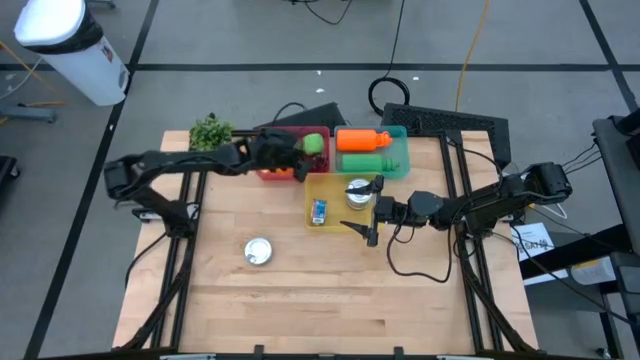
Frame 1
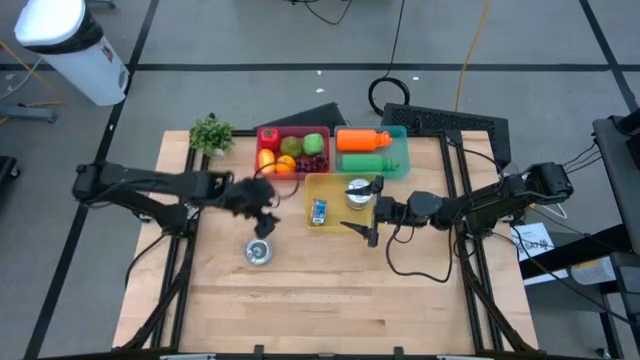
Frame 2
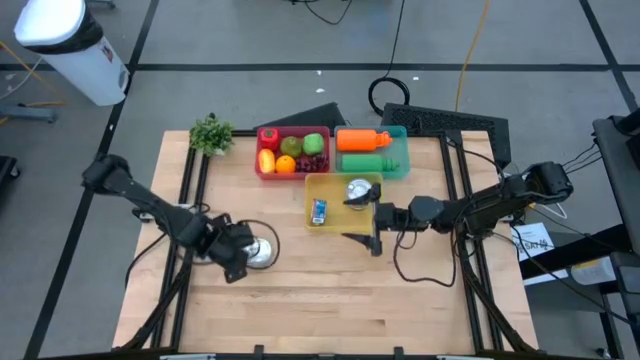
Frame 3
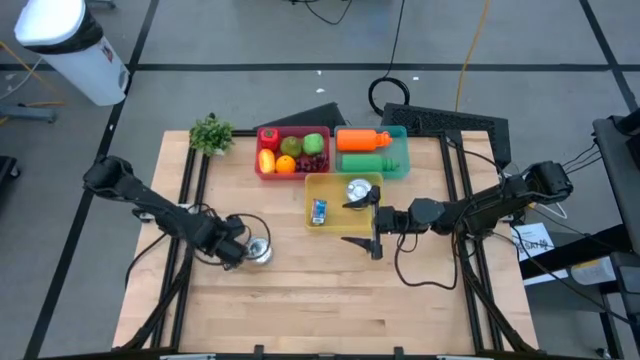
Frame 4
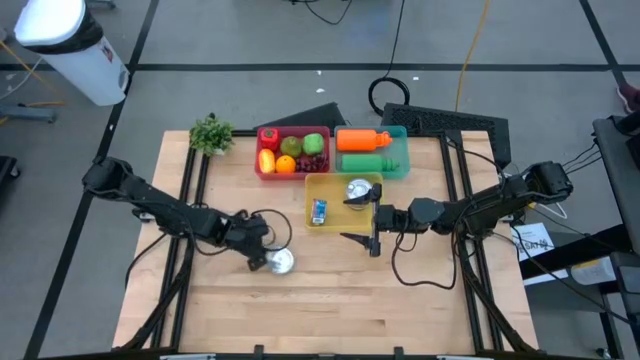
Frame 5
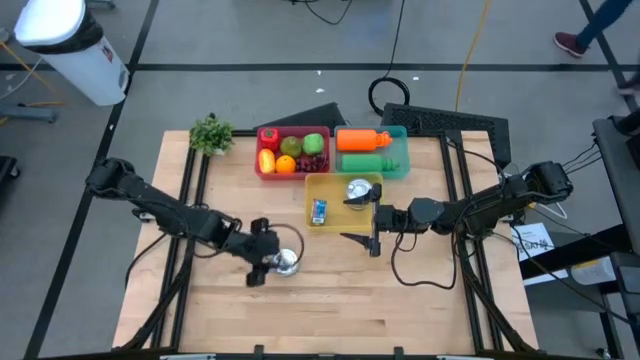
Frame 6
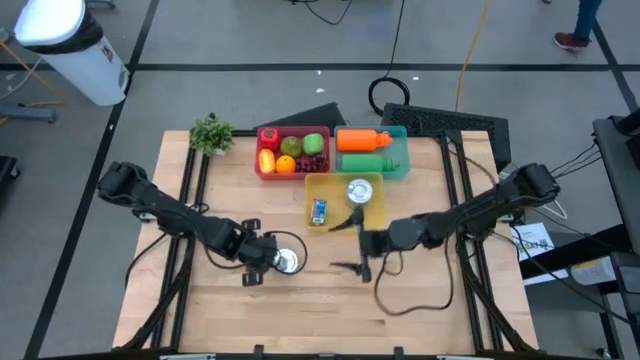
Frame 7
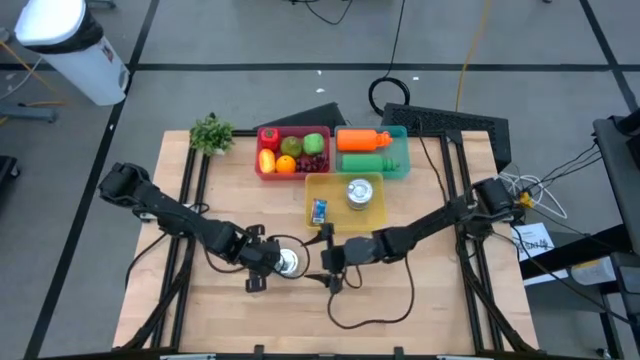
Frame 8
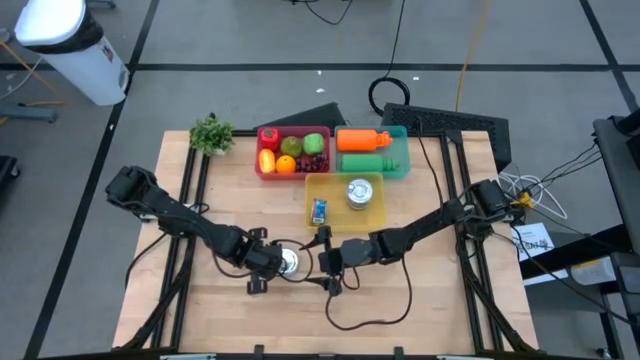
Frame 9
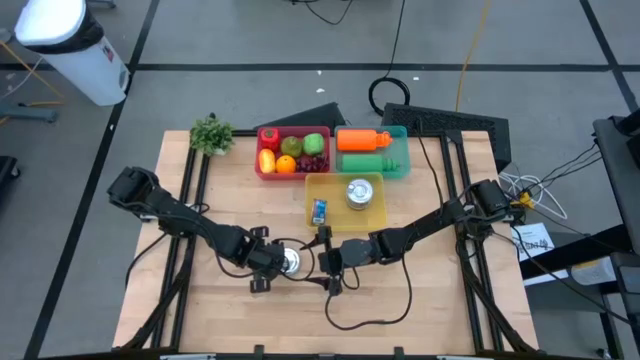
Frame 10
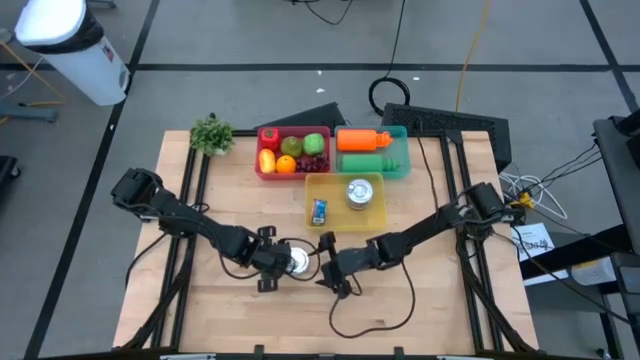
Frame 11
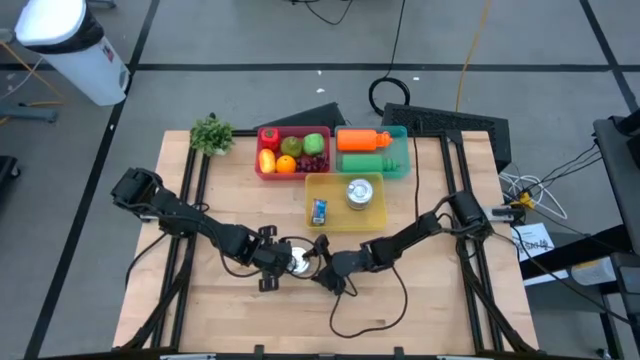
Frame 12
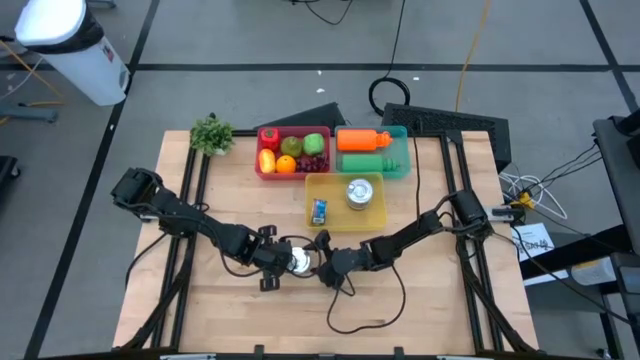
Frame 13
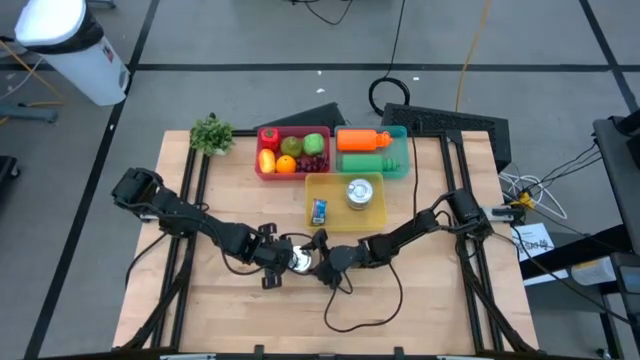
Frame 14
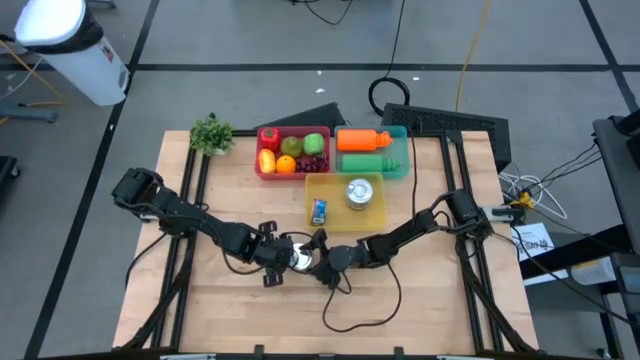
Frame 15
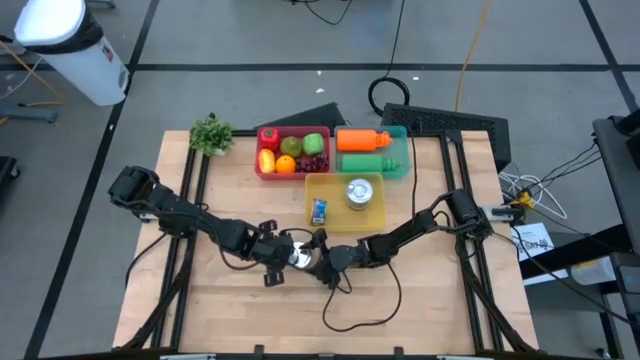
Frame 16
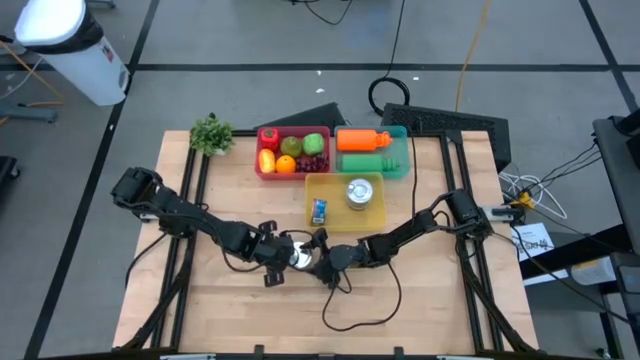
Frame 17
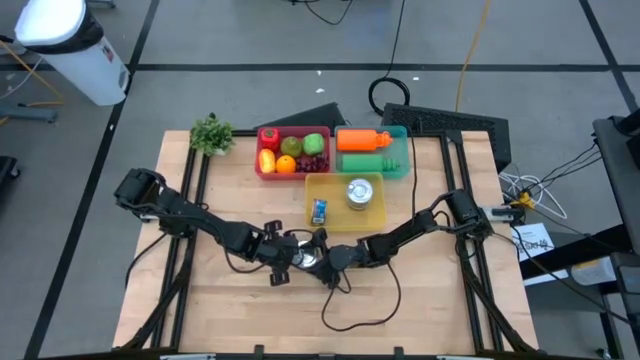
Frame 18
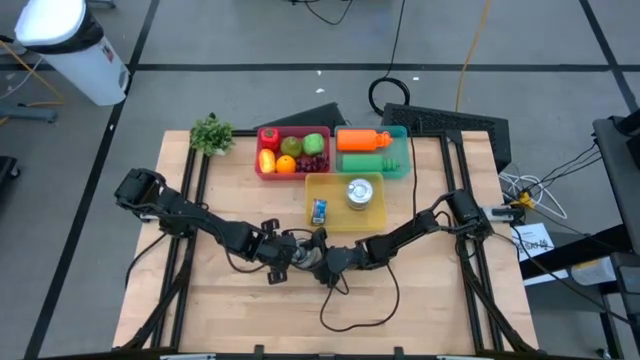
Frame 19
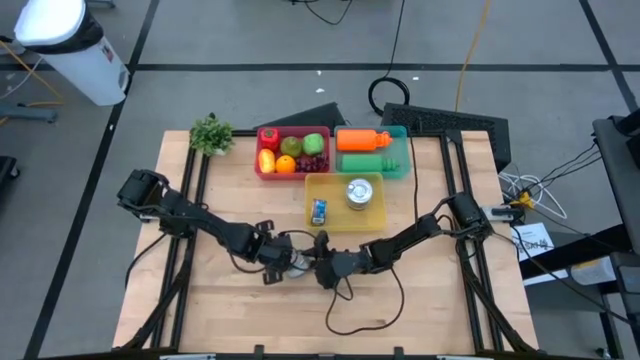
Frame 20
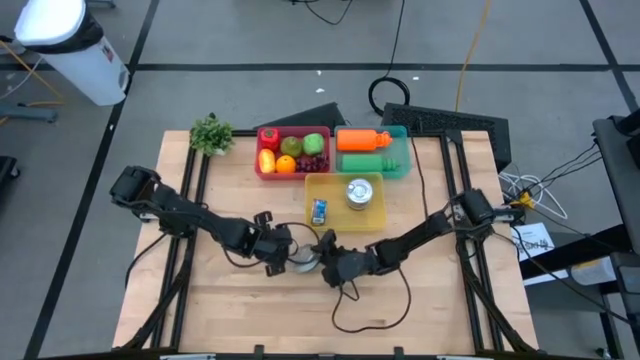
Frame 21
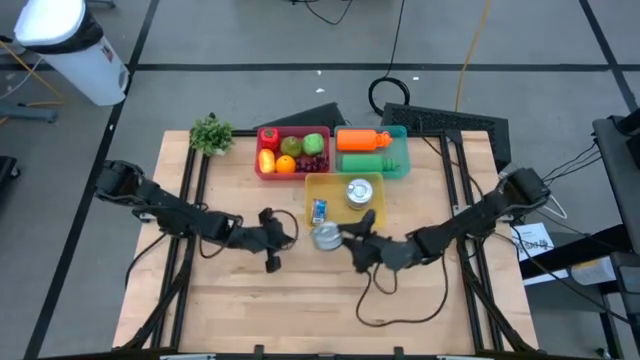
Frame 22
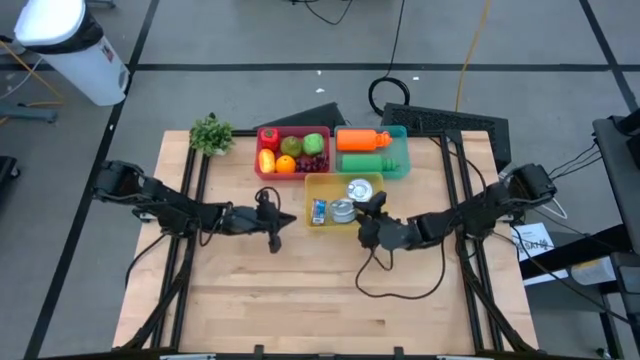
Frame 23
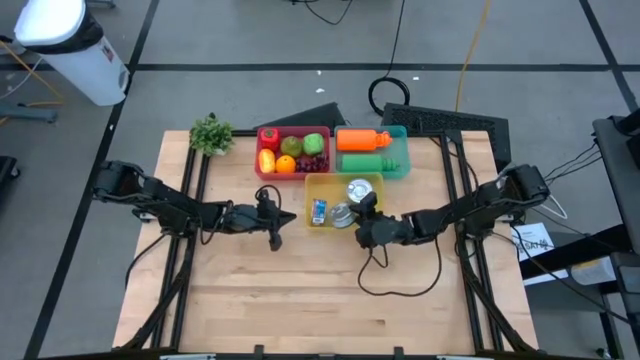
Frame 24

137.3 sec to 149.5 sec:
Task: Pick & Place Food Item
Put the green tuna can into the yellow bin

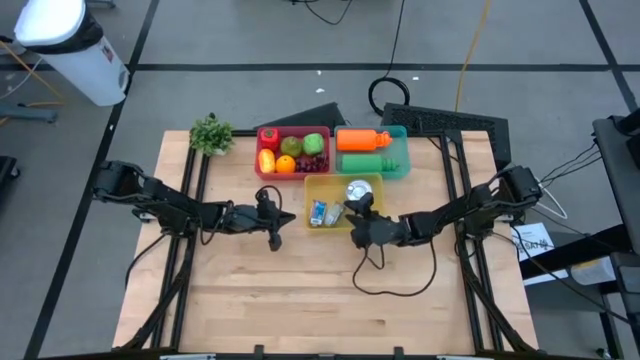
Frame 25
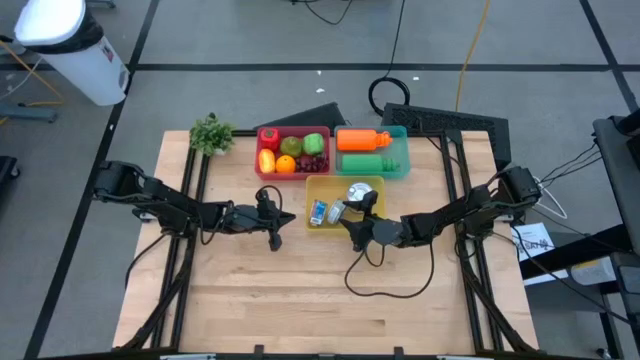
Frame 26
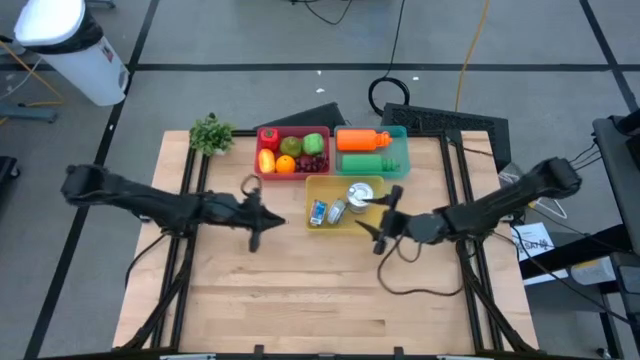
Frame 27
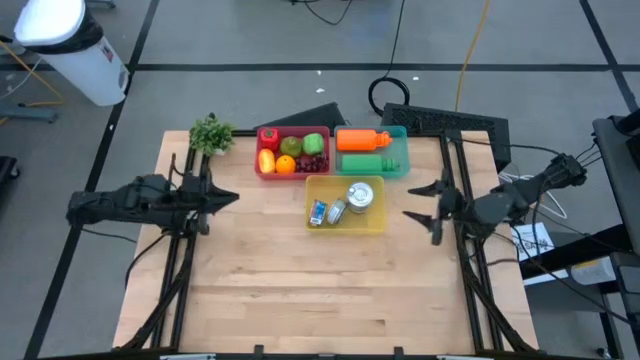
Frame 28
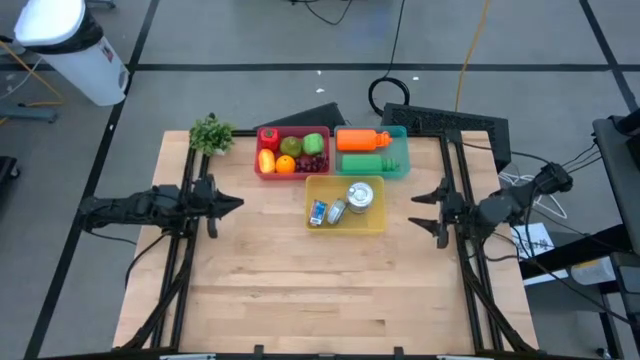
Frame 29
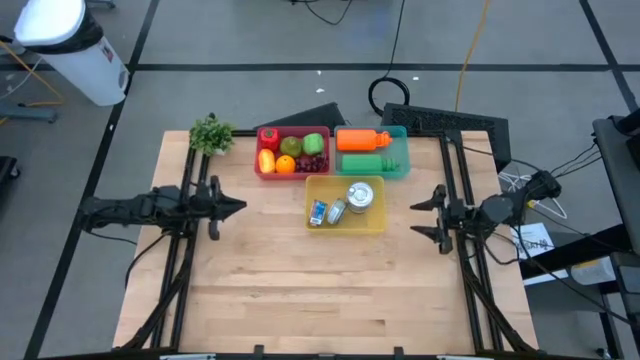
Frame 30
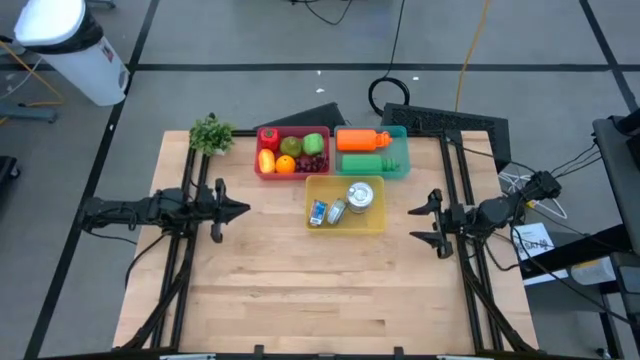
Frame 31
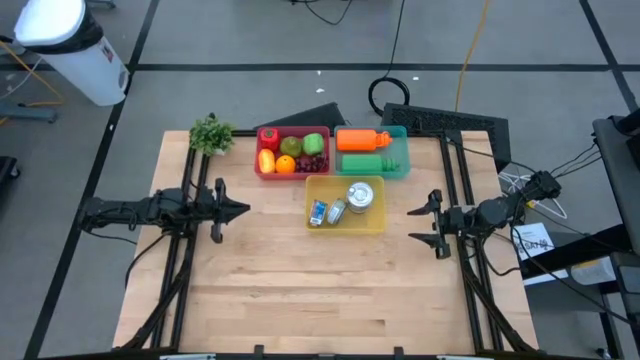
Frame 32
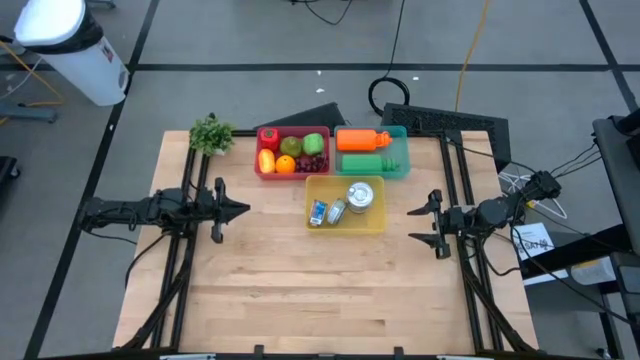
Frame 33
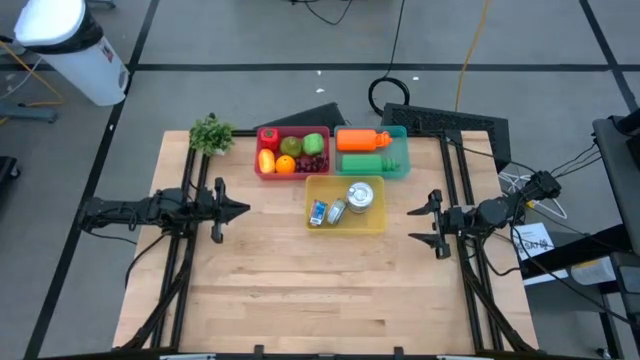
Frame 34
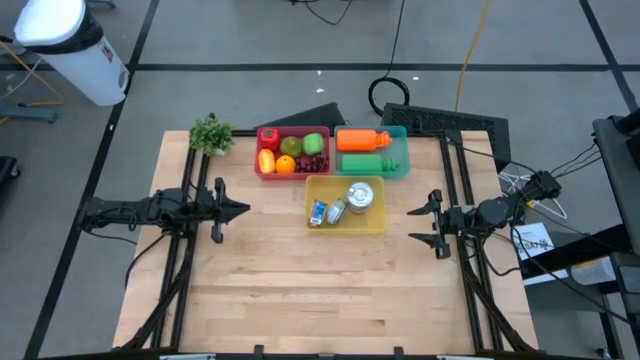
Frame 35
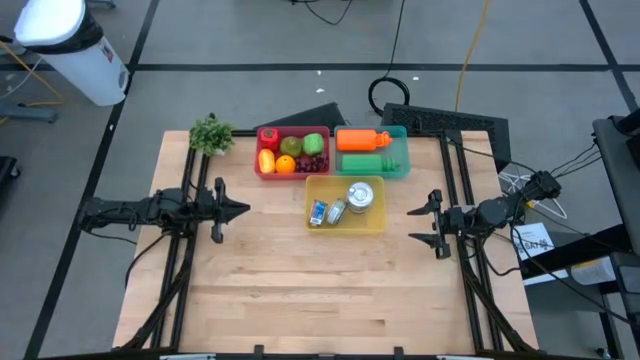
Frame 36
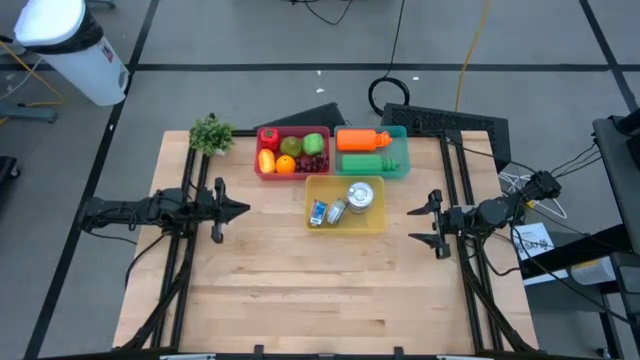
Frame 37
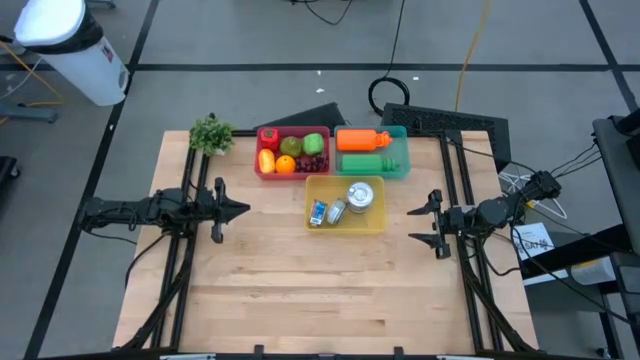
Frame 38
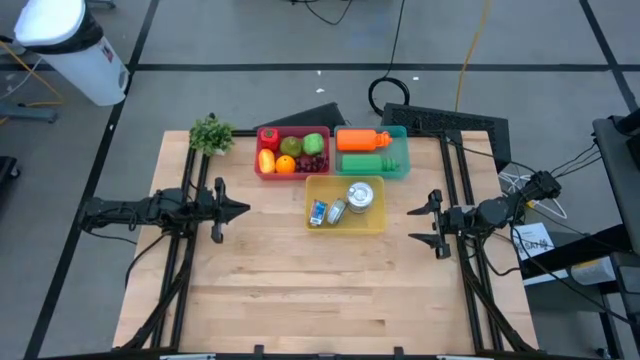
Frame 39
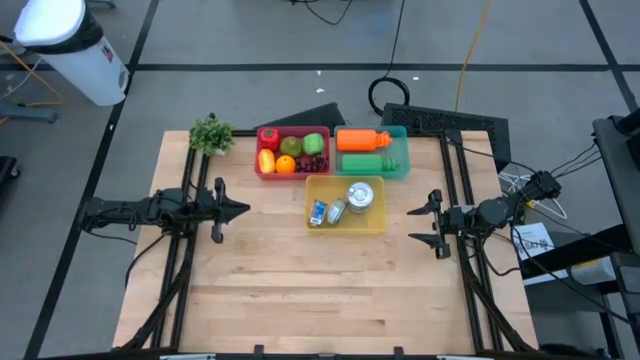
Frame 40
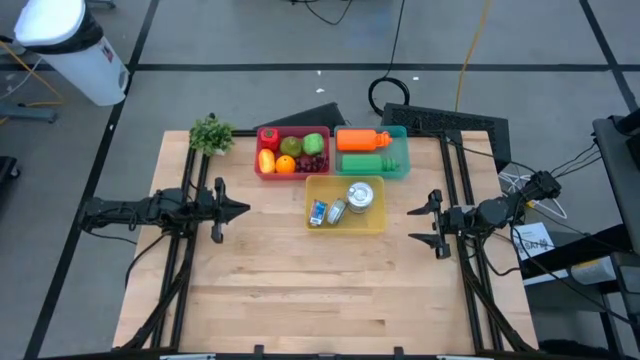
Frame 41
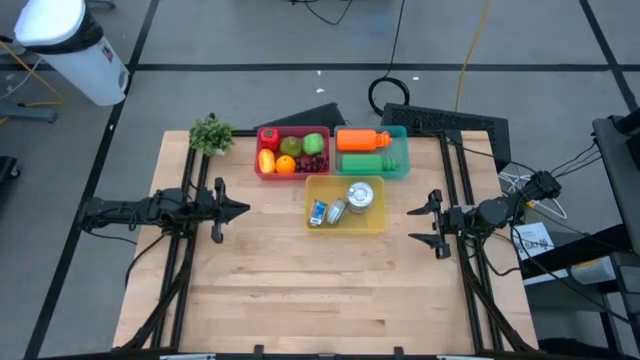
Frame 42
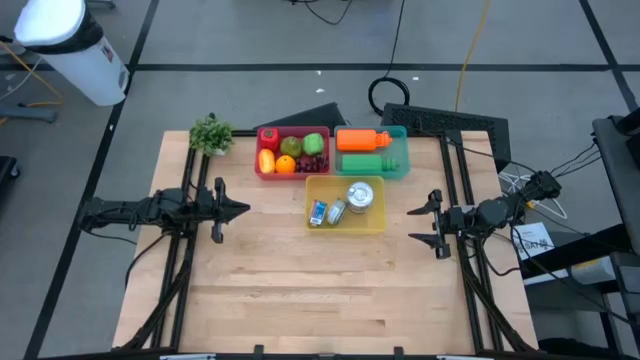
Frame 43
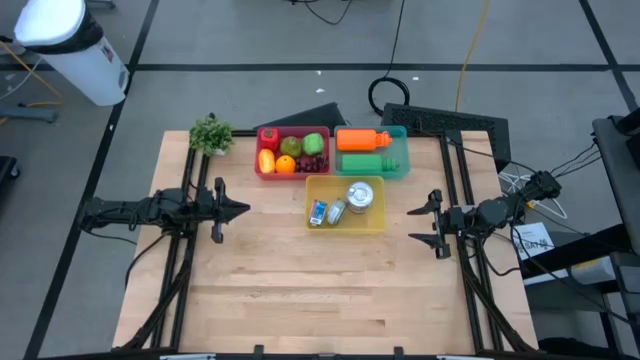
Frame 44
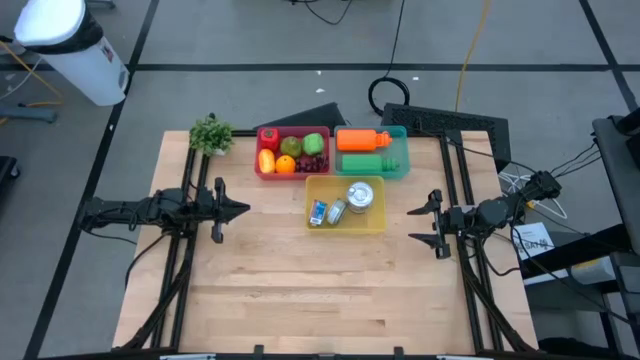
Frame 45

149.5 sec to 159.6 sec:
Return to Home Position
